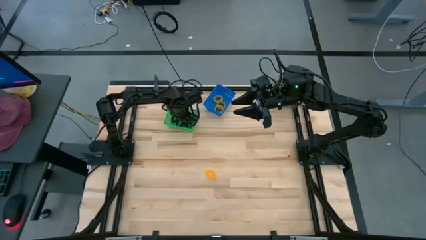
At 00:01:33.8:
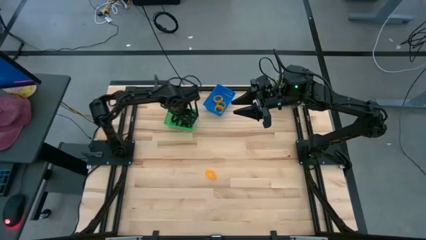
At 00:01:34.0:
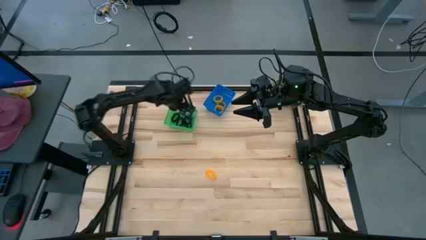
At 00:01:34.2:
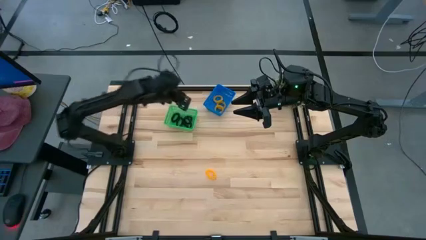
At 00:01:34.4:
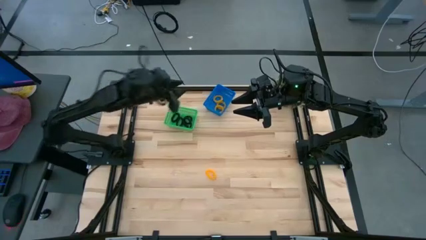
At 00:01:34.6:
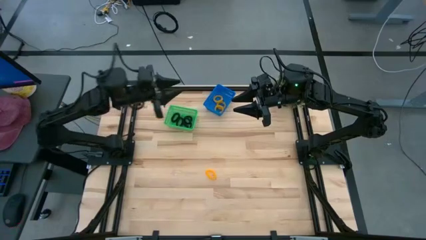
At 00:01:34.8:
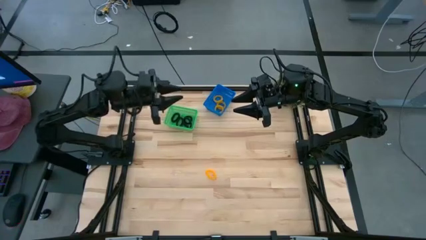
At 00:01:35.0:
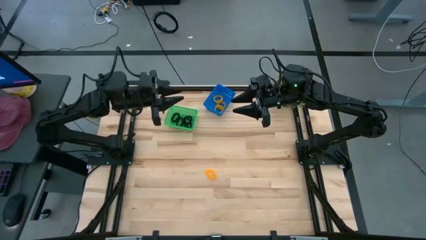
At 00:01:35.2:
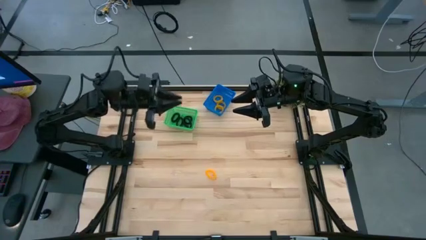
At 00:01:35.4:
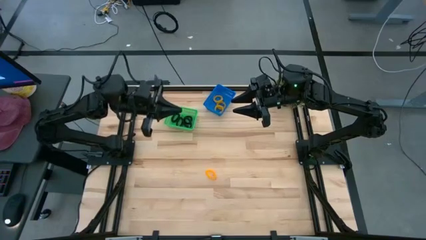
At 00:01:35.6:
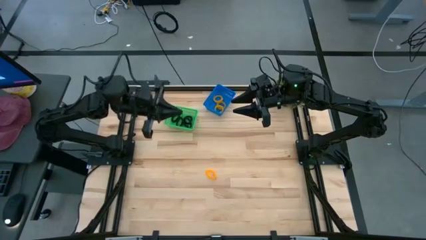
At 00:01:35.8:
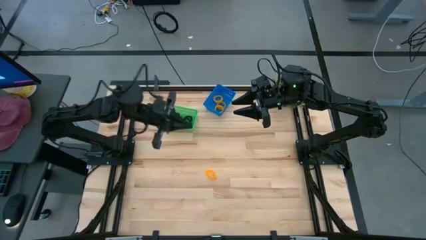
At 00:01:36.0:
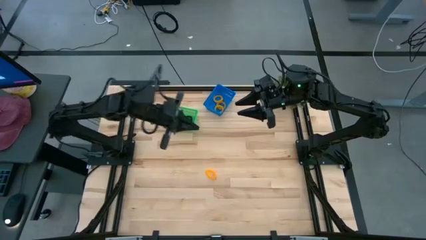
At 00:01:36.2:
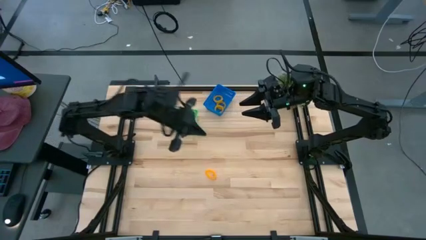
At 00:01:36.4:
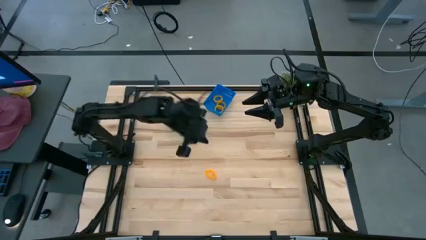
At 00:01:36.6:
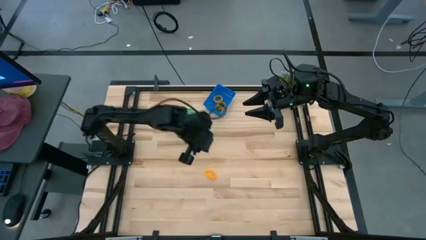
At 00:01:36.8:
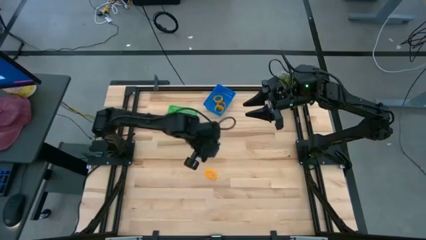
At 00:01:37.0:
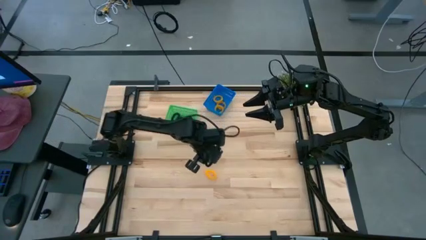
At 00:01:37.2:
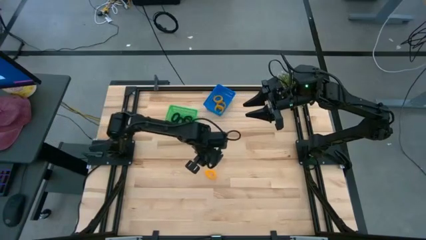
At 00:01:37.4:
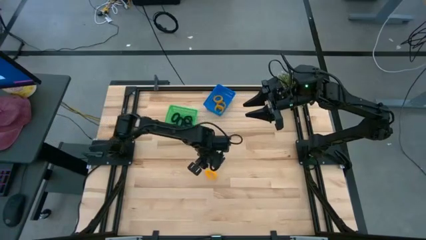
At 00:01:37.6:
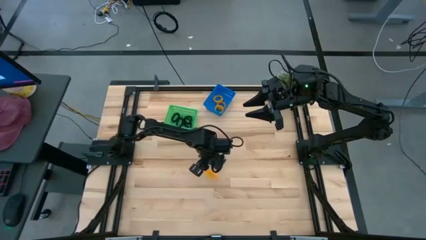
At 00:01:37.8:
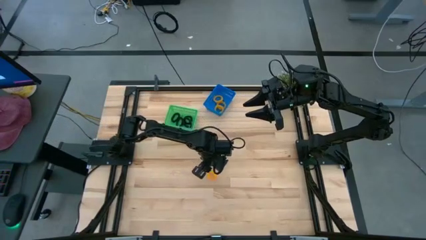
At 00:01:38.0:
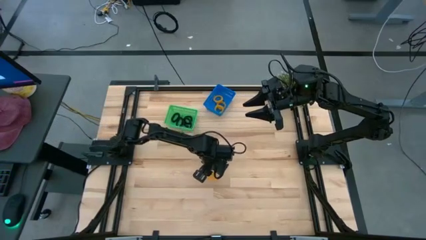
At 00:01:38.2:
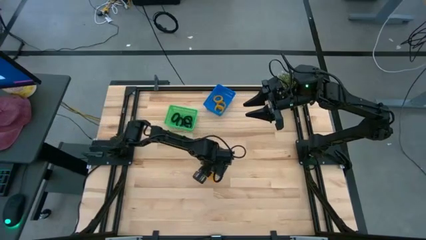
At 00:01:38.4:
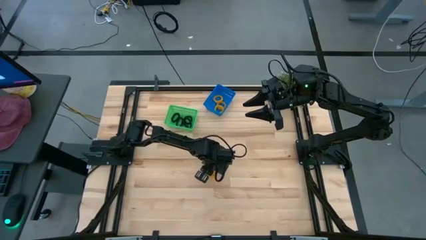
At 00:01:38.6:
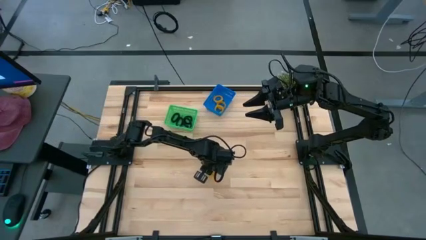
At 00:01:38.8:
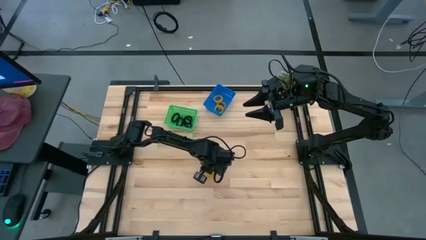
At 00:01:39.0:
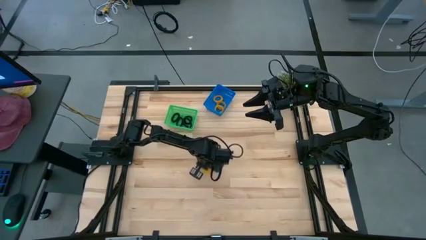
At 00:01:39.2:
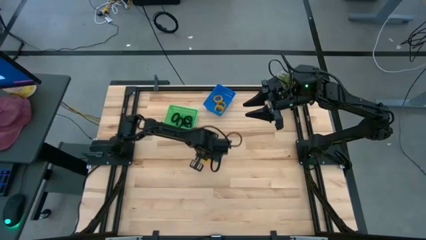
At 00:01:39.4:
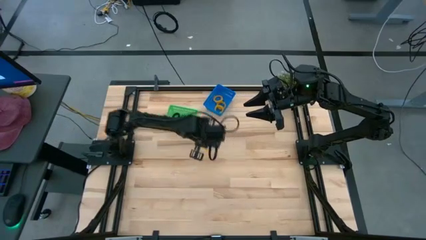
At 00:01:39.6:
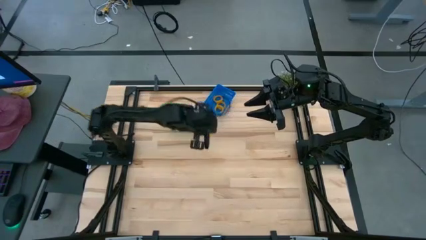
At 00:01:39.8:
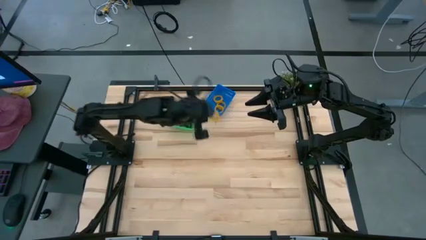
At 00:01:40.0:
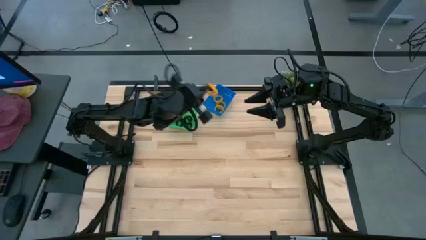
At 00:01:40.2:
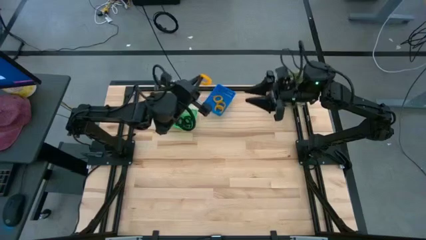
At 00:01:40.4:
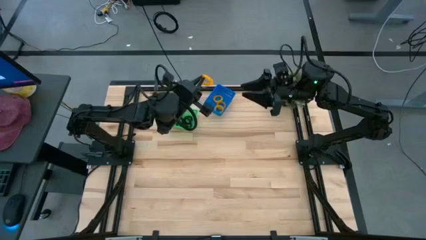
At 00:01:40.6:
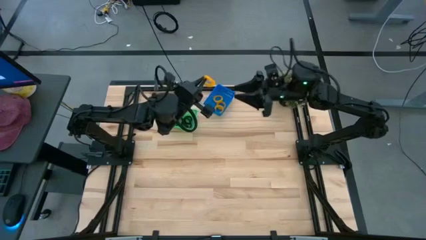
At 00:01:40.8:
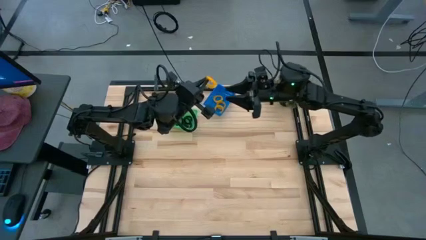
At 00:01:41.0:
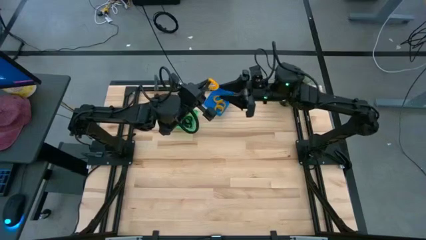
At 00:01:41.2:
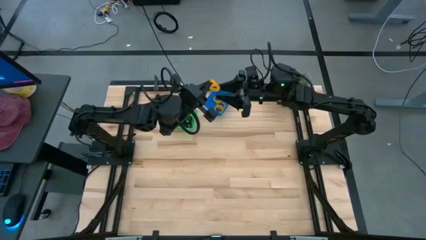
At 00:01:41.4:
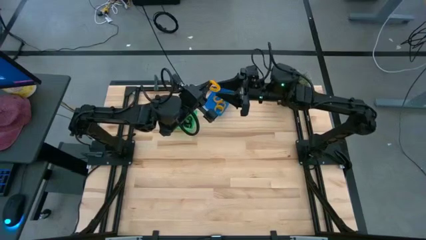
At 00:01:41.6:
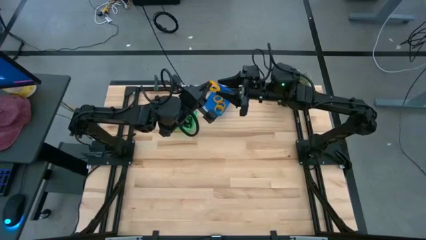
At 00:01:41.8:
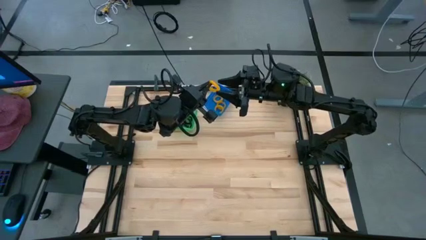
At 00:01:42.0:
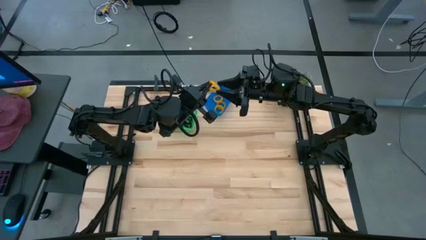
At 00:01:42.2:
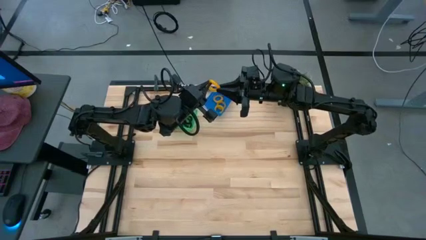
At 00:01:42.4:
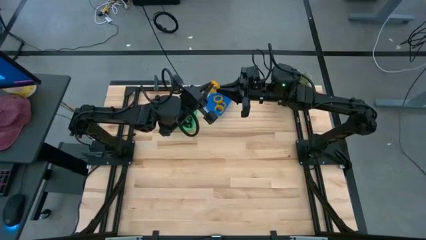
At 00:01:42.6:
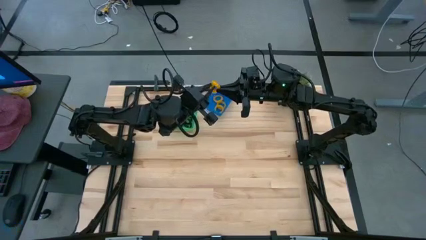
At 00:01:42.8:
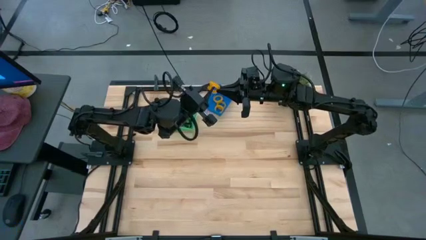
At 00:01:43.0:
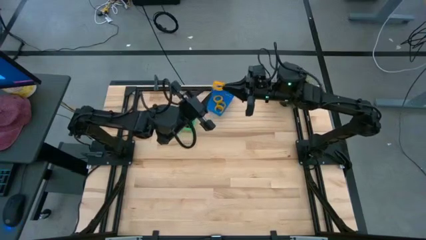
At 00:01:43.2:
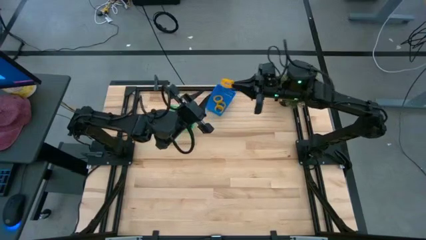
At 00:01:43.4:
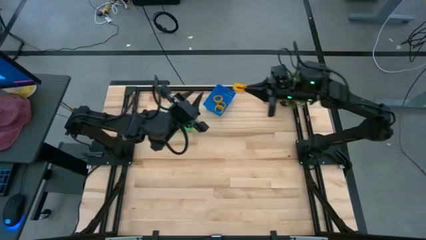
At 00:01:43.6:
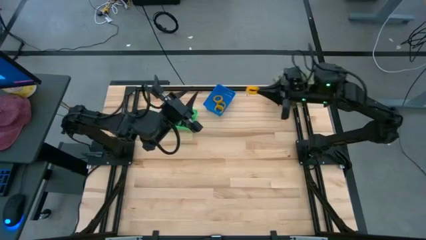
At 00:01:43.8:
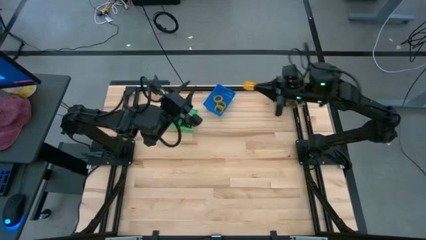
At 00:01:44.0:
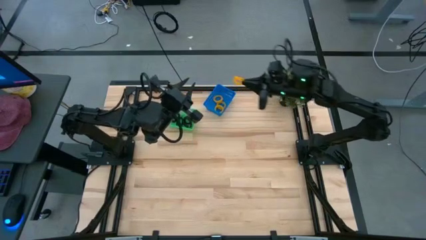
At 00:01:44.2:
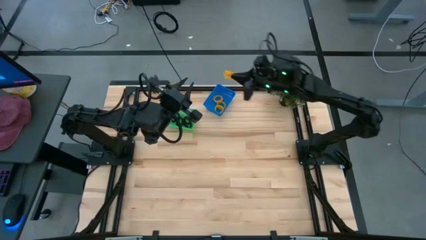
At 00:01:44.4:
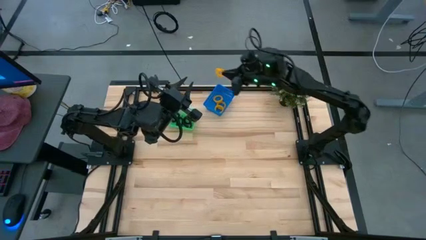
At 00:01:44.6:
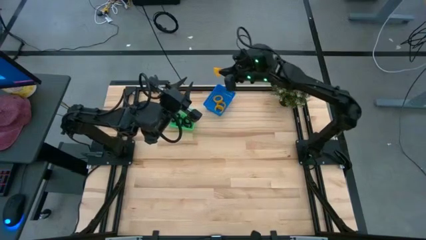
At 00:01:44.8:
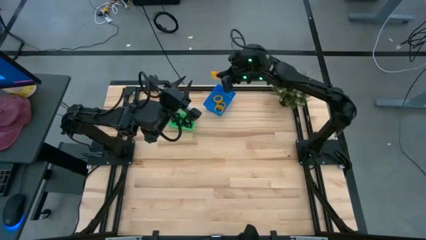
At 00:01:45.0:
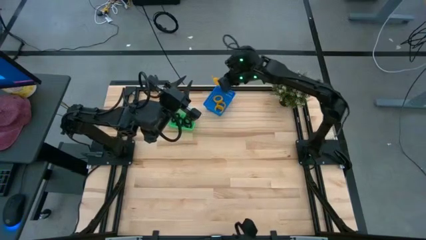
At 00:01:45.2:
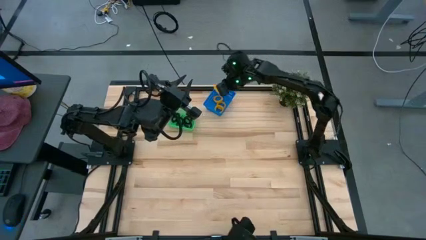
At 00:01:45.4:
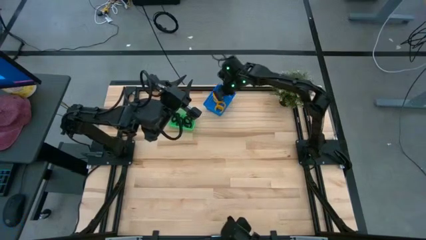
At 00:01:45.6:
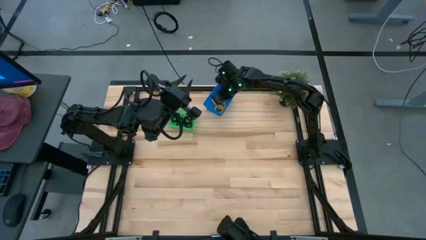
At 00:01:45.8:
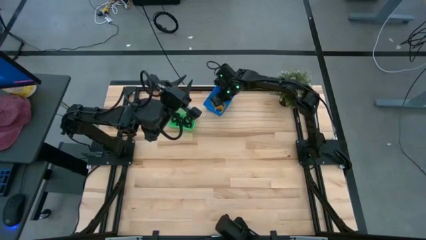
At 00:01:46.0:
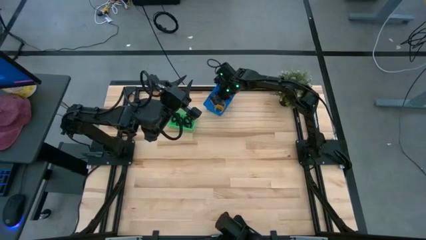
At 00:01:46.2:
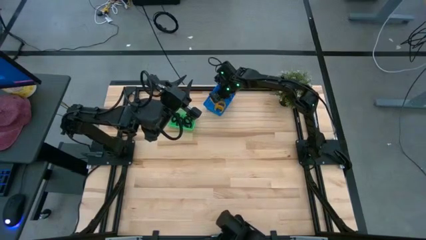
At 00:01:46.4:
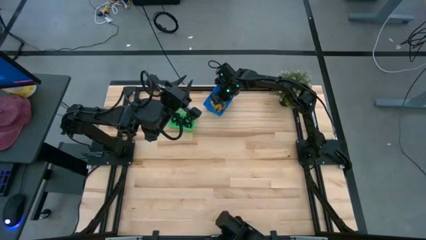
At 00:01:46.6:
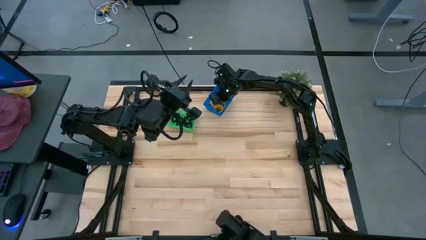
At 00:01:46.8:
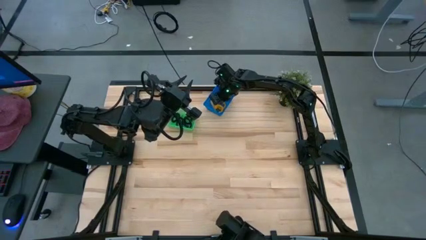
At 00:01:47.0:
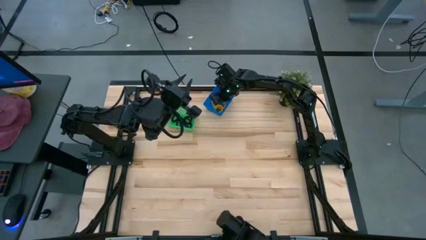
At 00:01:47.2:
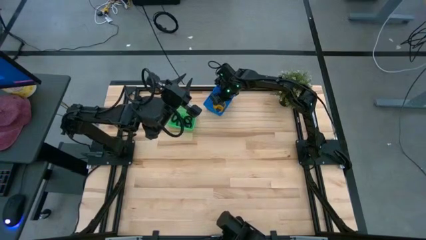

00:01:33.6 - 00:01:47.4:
Task: Sort spring keychains into baskets
Put the yellow spring keychain into the blue basket
